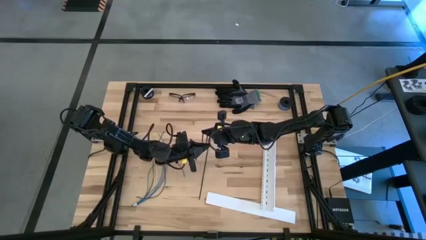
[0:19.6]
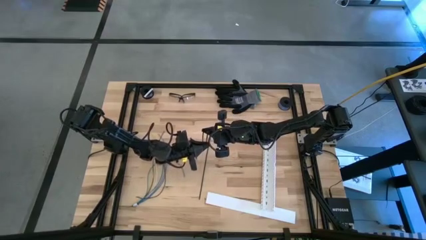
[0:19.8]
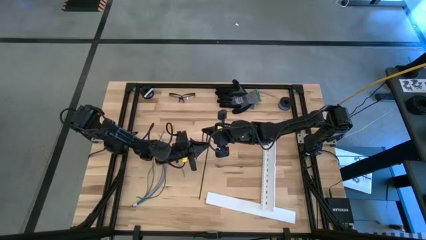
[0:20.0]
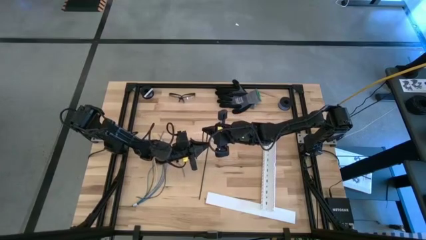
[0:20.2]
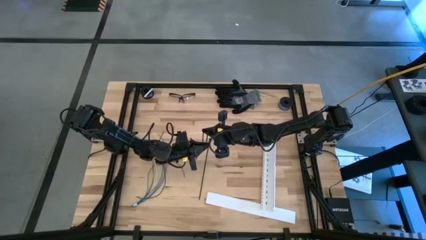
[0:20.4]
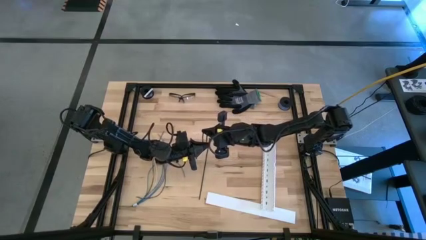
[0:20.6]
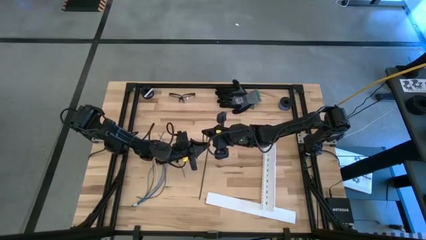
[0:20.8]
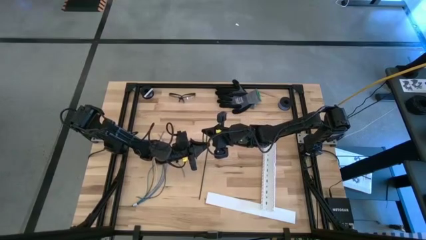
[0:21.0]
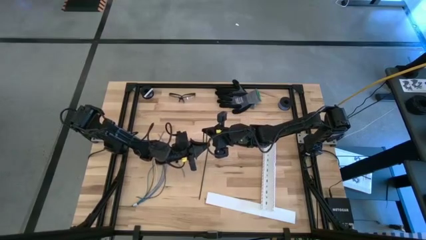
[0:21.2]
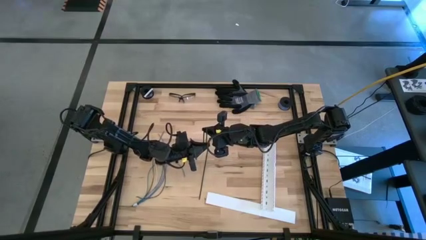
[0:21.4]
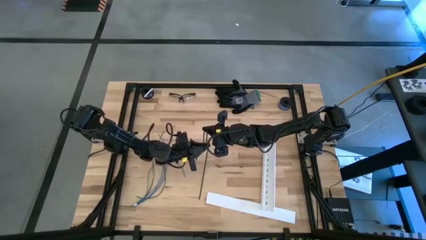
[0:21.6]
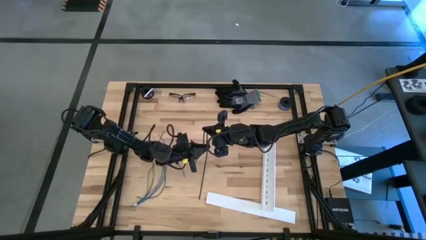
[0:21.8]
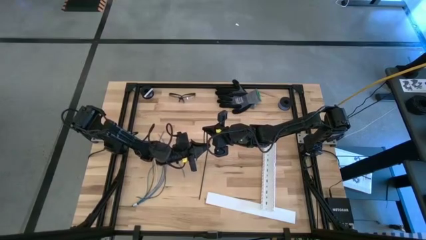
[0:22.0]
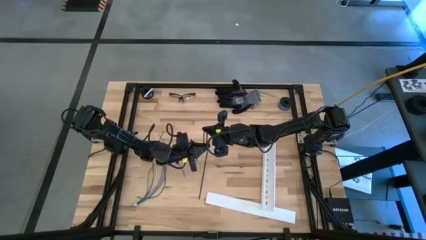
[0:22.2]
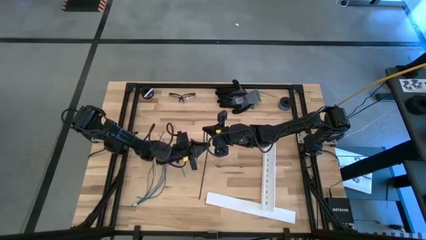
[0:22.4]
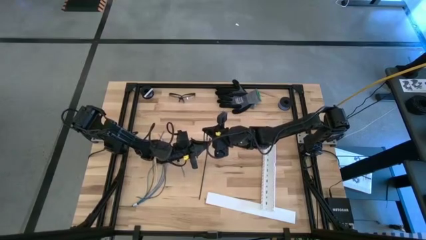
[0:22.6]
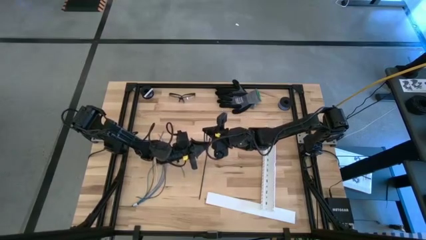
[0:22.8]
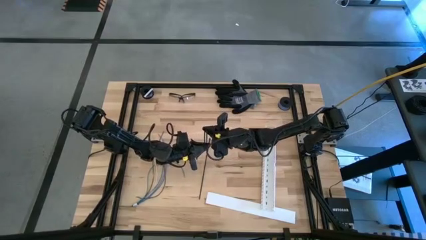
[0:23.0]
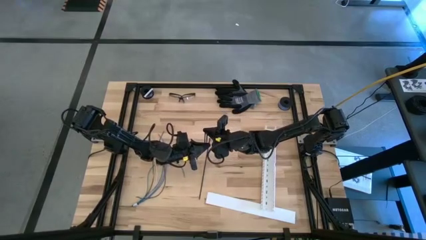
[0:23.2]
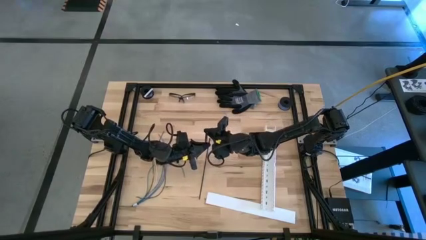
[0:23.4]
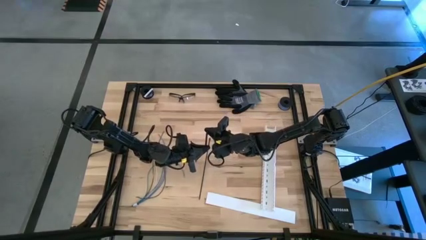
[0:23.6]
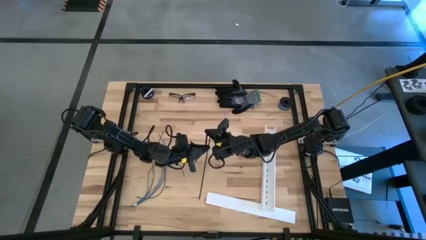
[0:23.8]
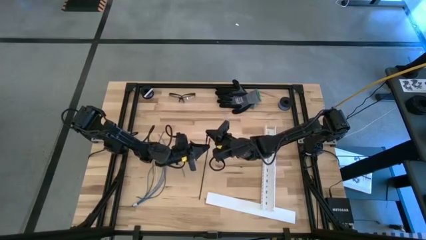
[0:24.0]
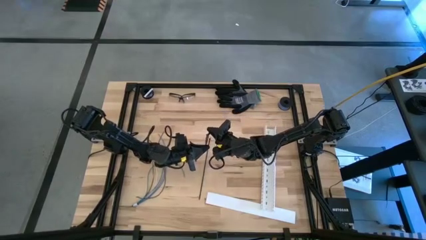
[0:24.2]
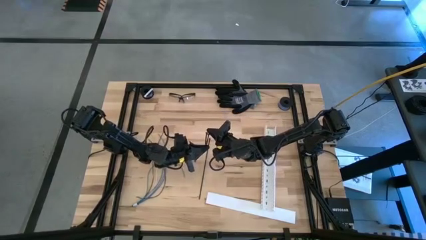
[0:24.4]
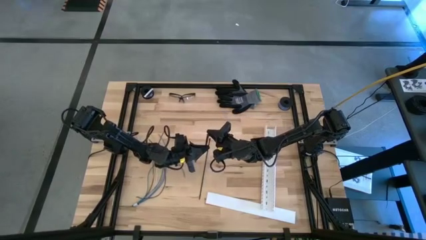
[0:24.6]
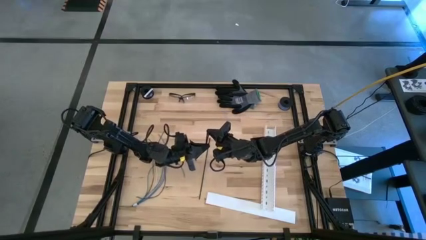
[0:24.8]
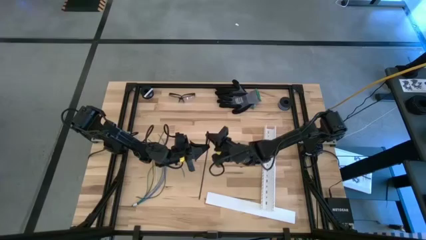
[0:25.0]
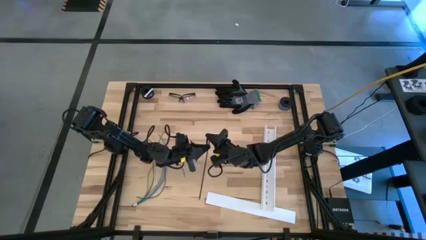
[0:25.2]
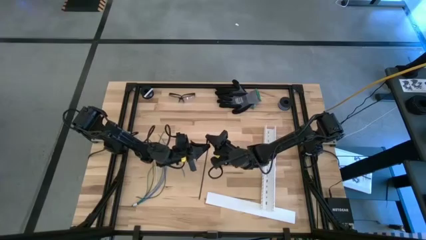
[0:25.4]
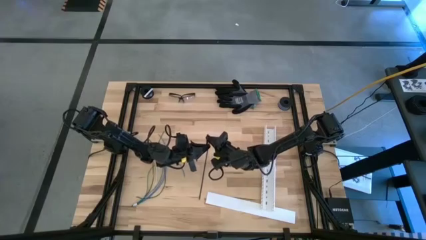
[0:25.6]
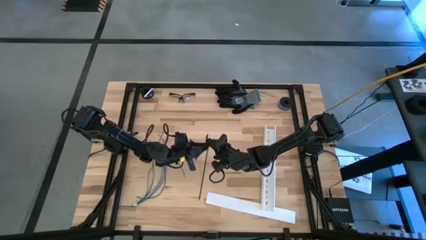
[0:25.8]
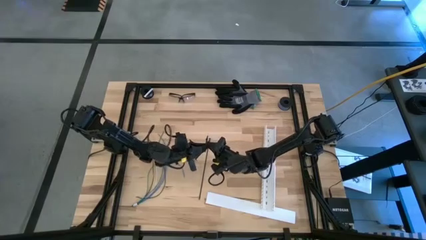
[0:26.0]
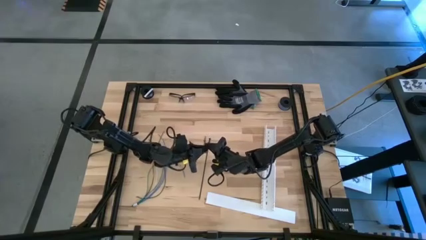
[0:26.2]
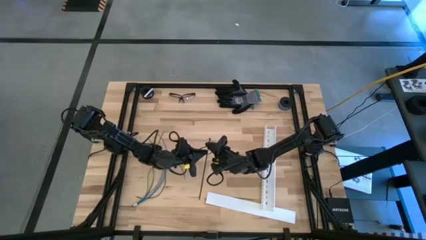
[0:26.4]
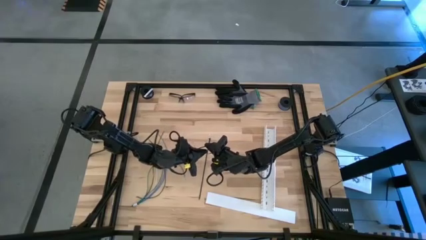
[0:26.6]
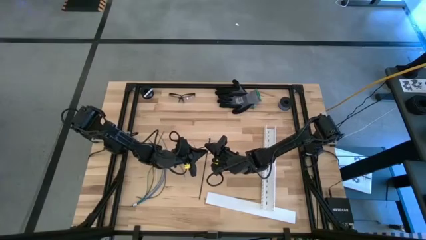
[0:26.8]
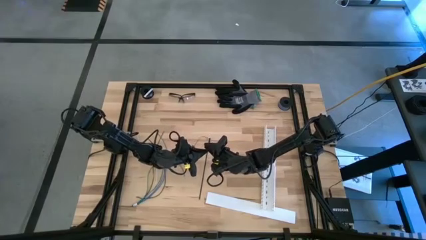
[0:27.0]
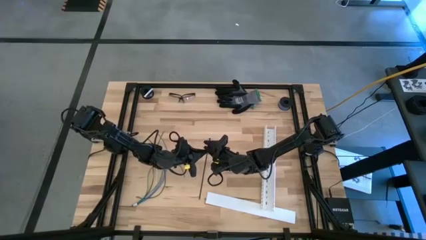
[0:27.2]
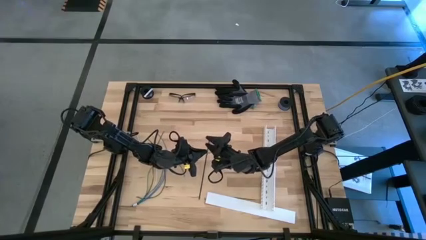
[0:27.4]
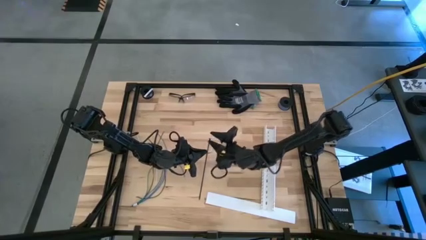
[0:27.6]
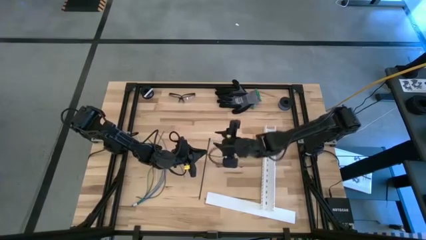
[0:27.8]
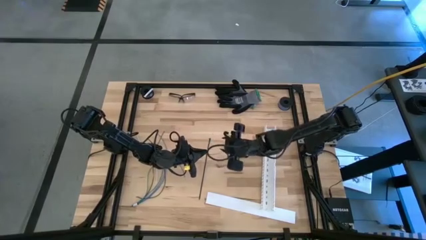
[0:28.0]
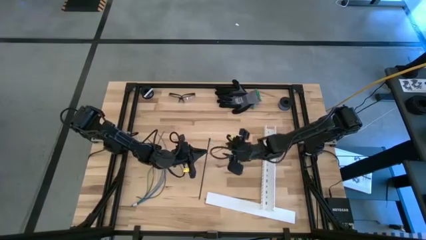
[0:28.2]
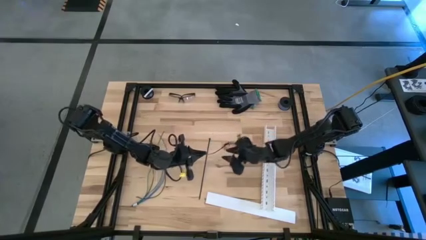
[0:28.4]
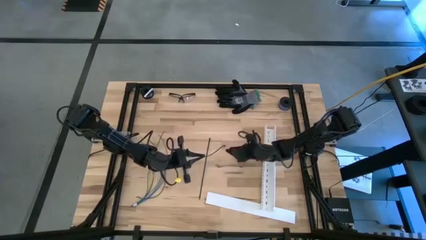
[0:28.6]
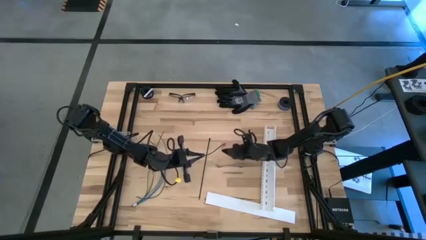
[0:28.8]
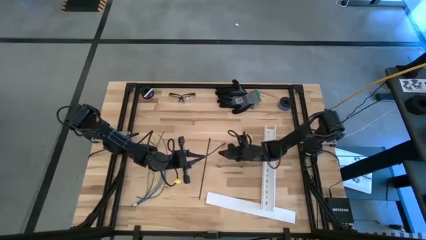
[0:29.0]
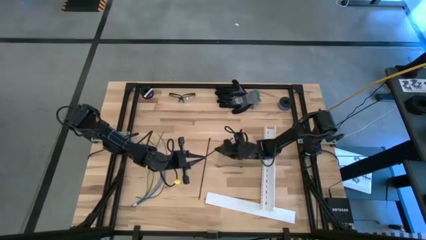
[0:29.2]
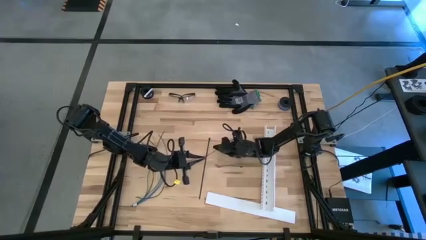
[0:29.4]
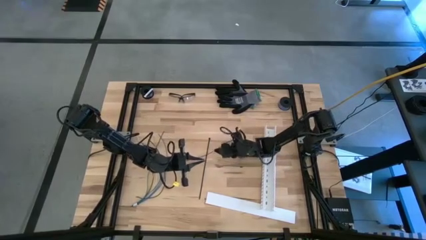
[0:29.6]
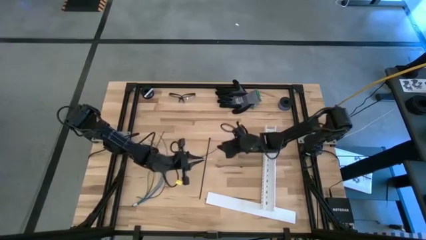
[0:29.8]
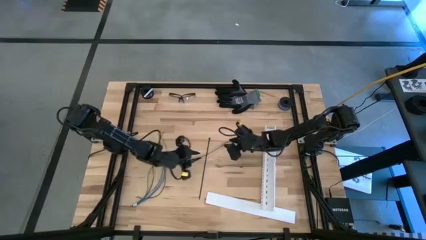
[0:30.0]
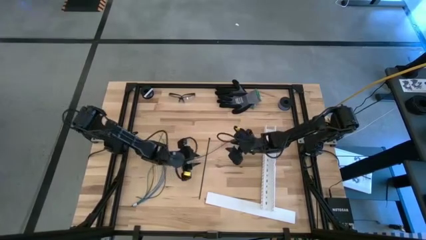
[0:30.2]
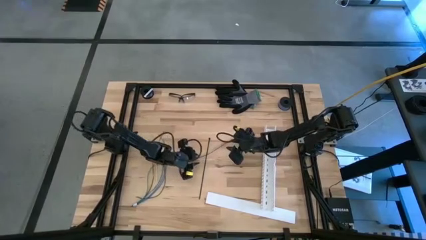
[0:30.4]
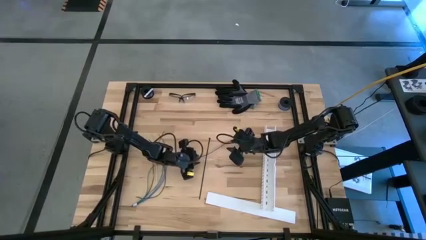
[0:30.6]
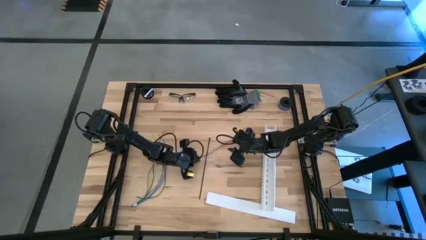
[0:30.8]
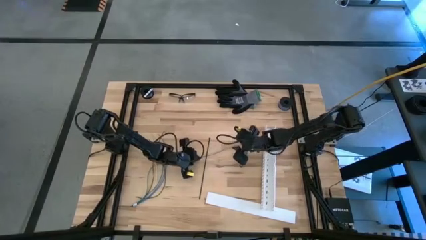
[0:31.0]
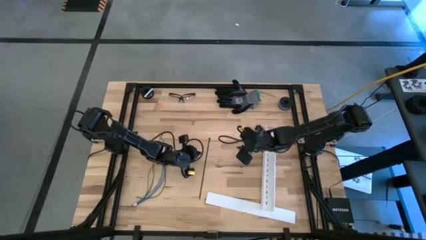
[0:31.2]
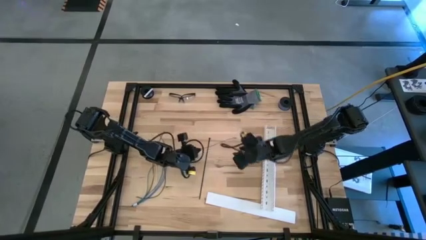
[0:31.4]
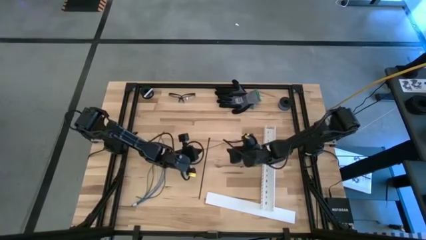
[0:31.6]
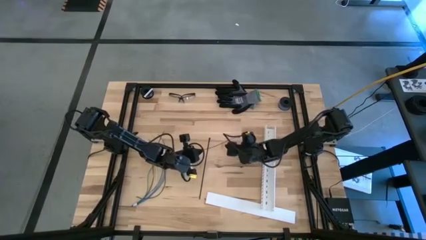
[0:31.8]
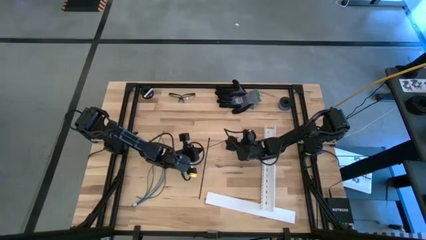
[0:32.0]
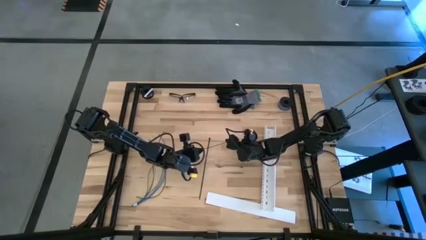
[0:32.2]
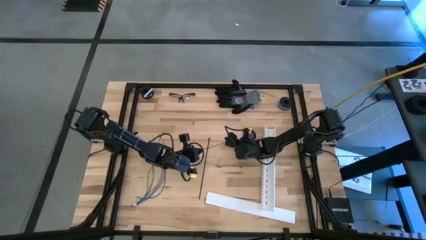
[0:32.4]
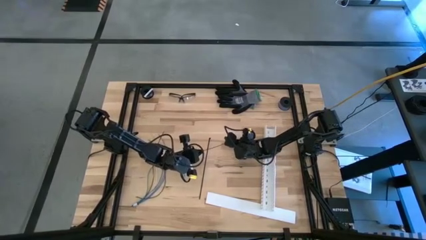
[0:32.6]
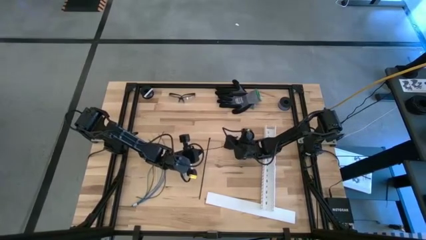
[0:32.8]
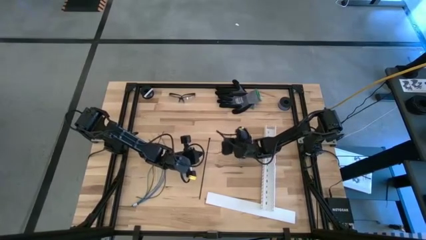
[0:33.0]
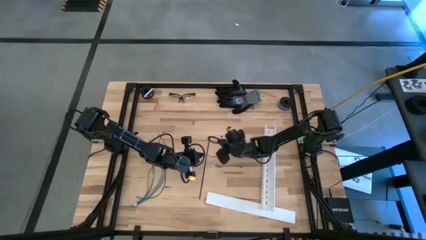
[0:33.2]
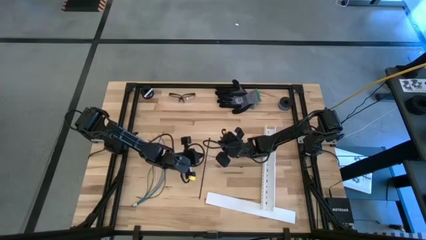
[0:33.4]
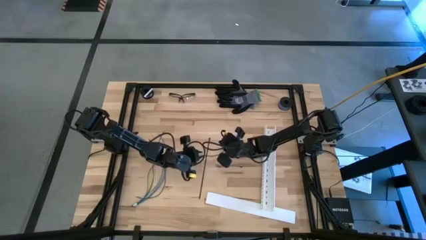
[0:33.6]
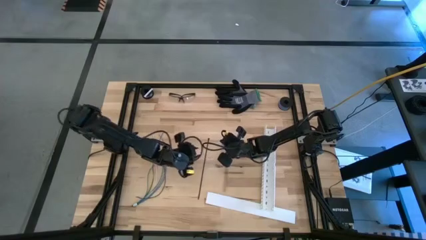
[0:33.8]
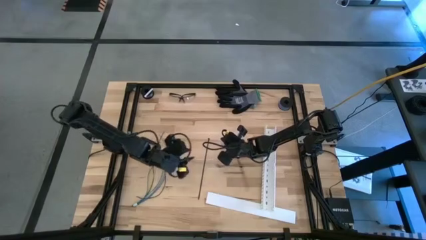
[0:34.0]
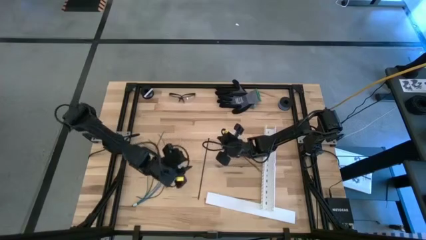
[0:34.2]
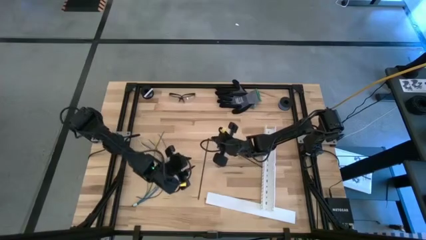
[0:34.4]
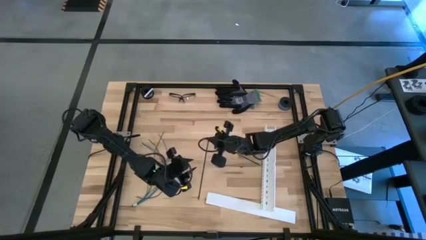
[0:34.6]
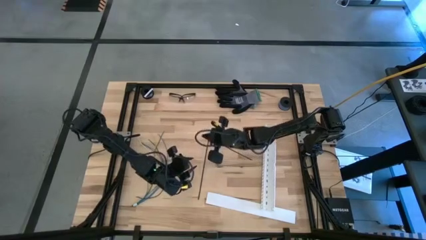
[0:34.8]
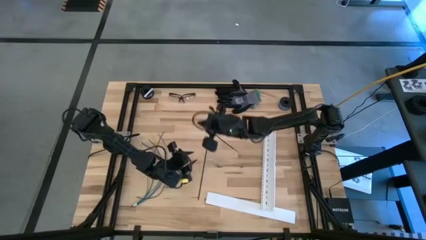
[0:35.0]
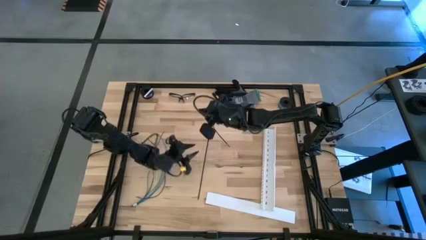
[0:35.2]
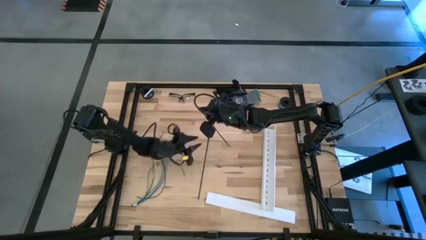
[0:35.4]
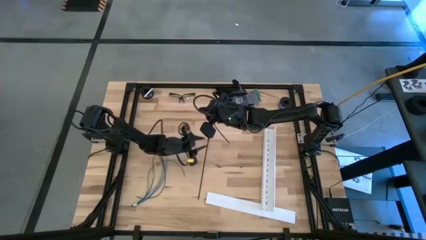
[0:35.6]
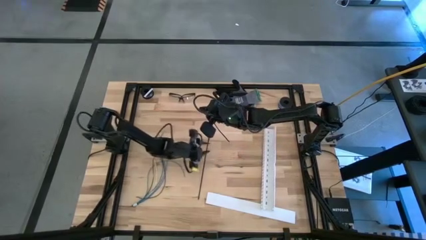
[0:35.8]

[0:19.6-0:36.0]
Task: Ziptie cables
Wrap the cable wires with the black zip tie
